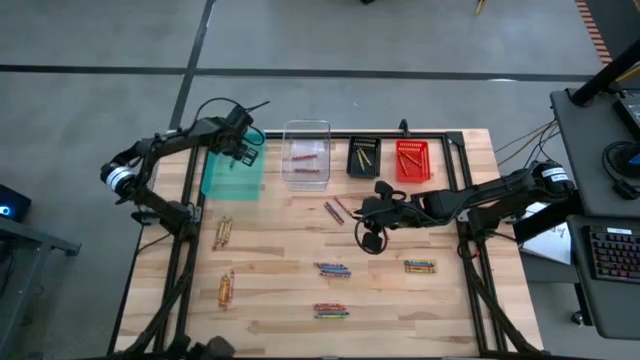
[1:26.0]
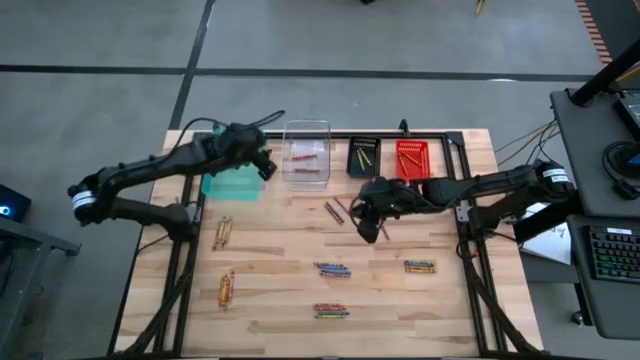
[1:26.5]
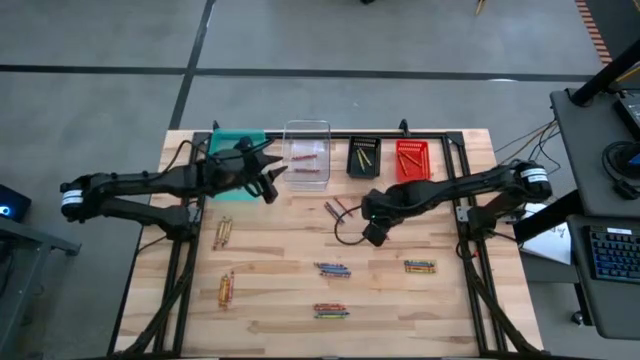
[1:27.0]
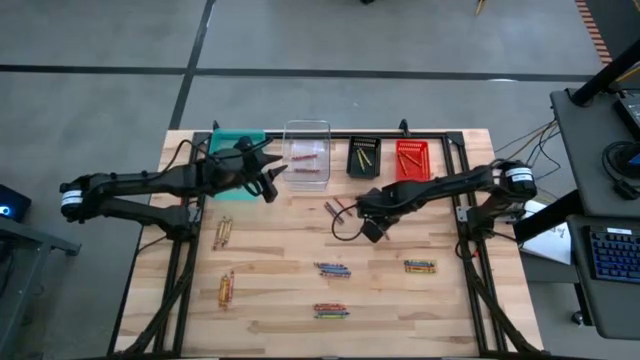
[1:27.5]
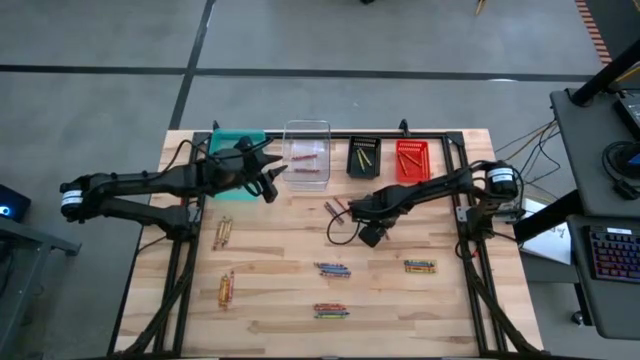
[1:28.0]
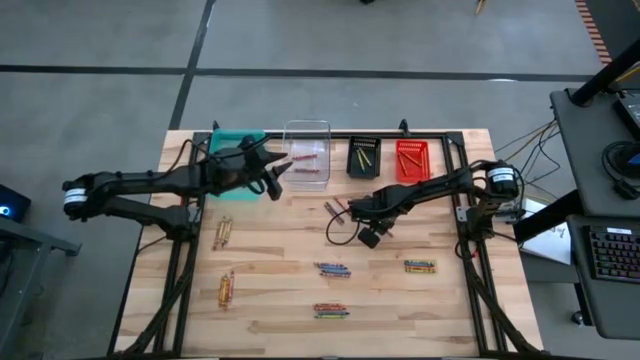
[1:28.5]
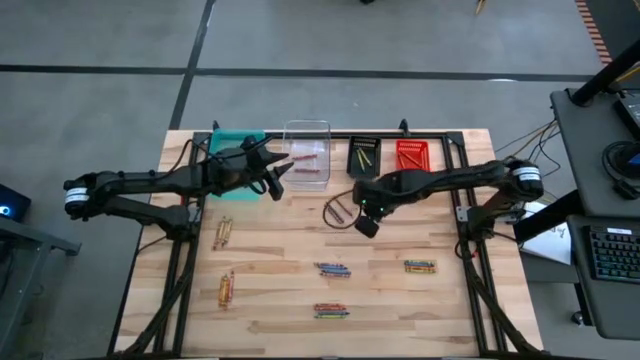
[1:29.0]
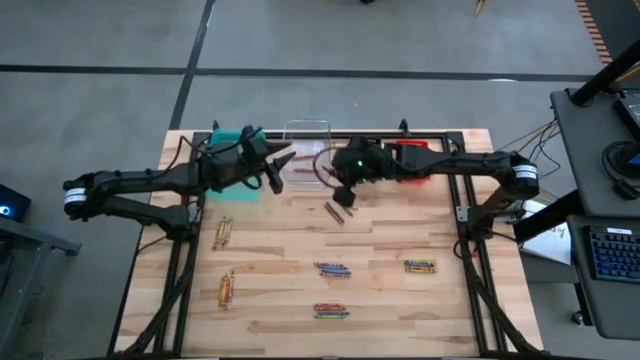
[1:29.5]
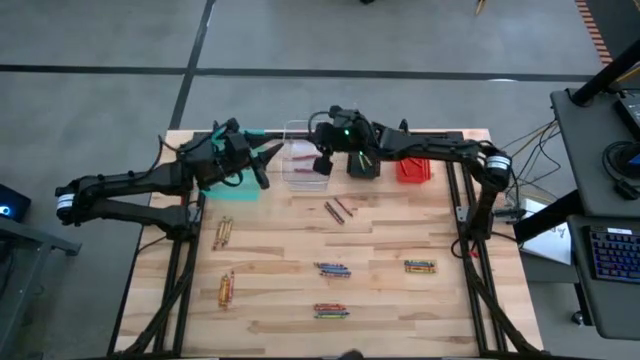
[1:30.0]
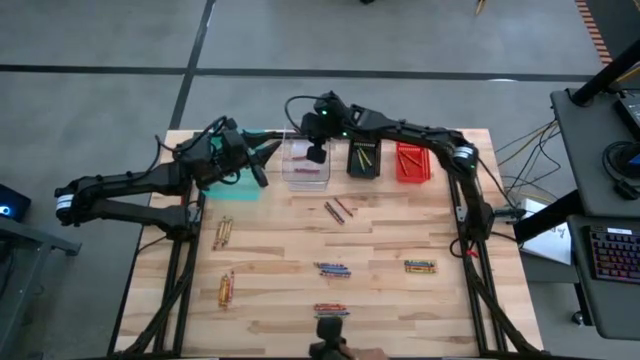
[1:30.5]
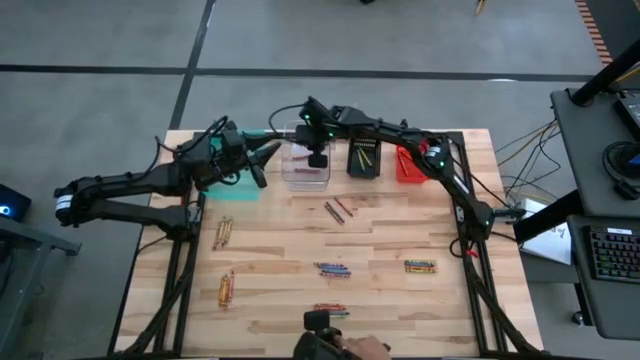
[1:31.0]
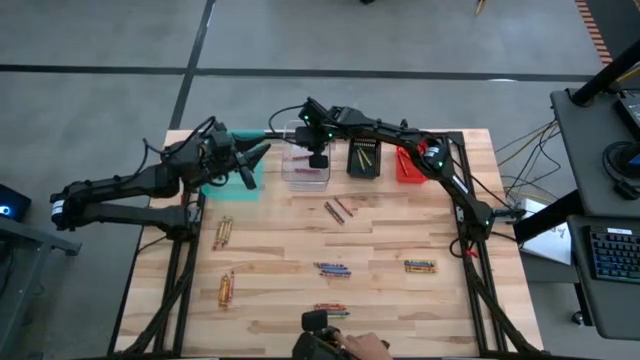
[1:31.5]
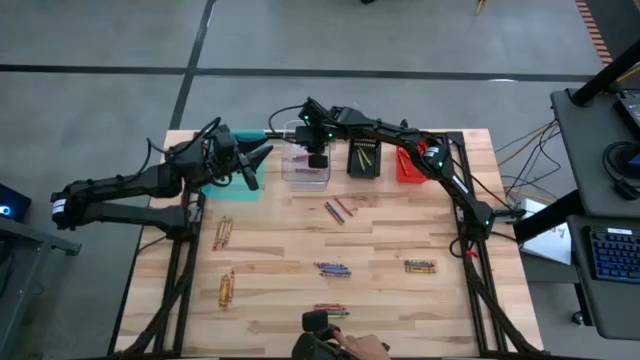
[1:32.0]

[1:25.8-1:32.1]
Task: Sort crayons
Put the red crayon into the transparent bin

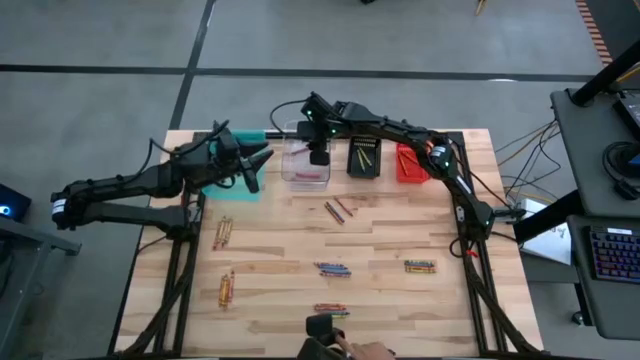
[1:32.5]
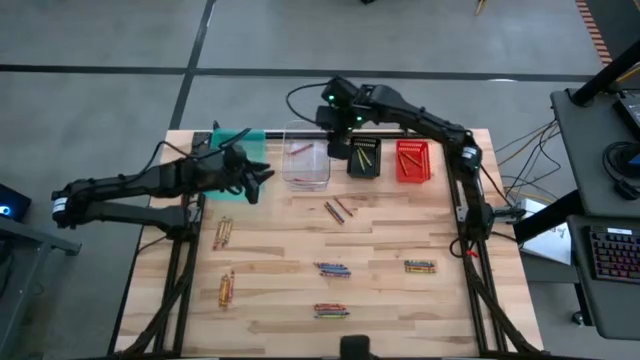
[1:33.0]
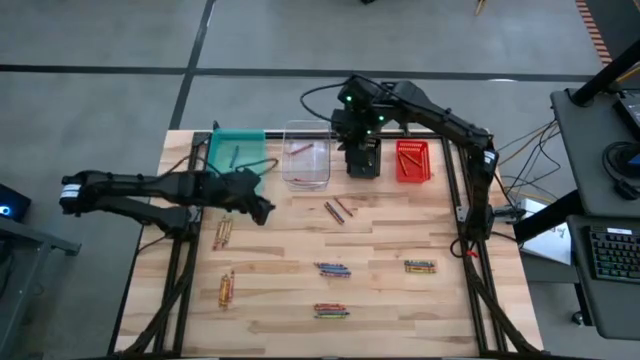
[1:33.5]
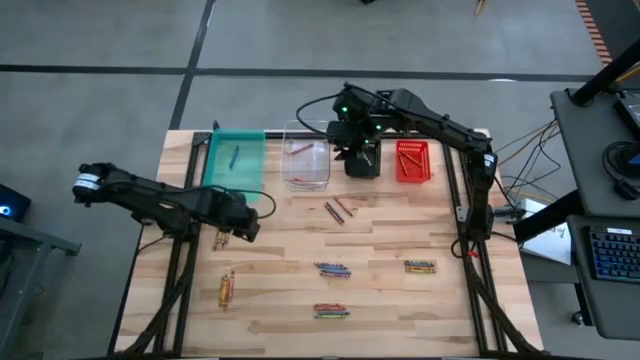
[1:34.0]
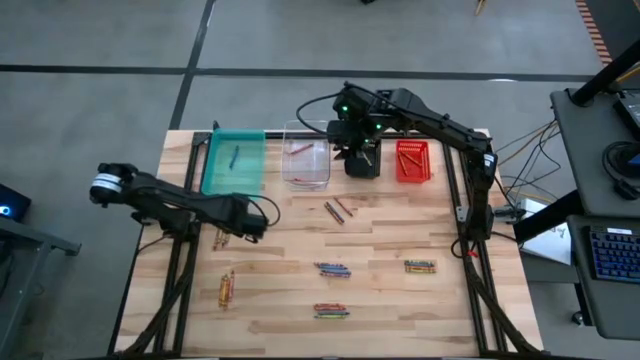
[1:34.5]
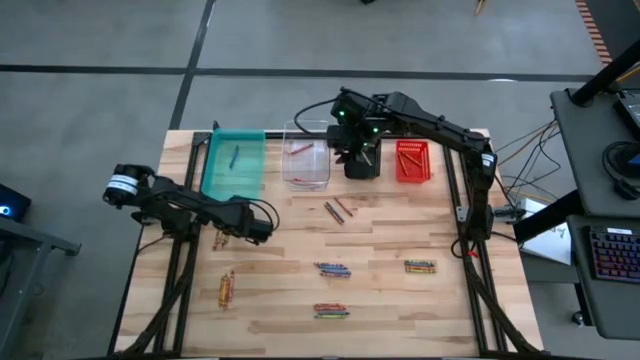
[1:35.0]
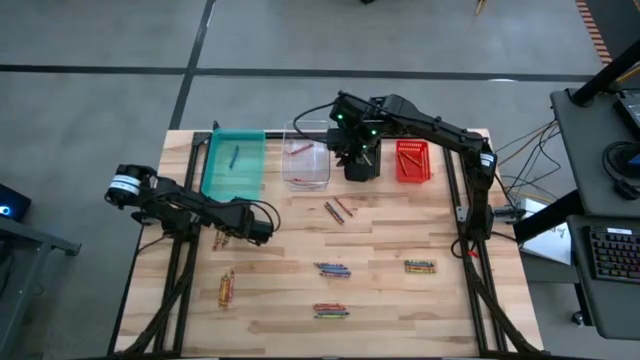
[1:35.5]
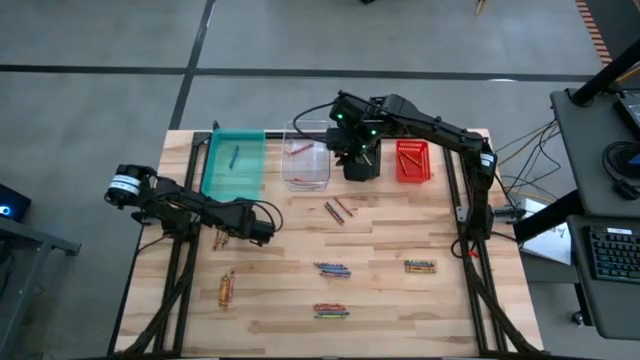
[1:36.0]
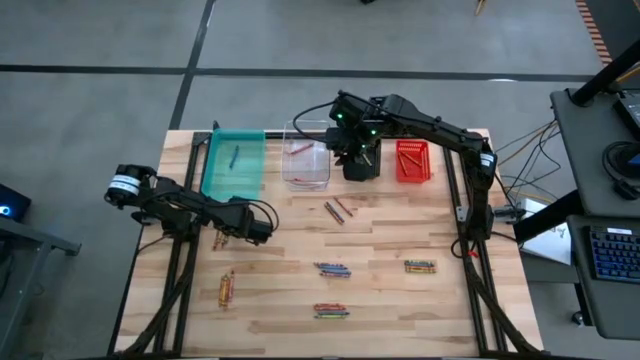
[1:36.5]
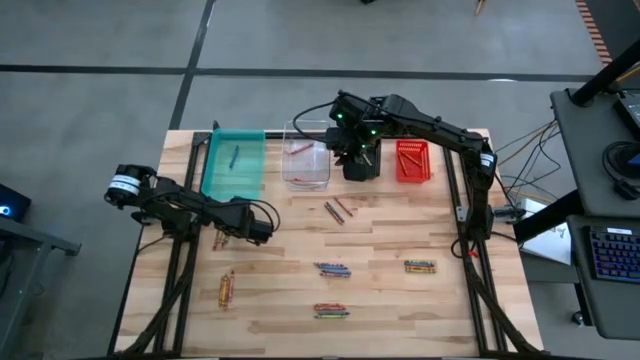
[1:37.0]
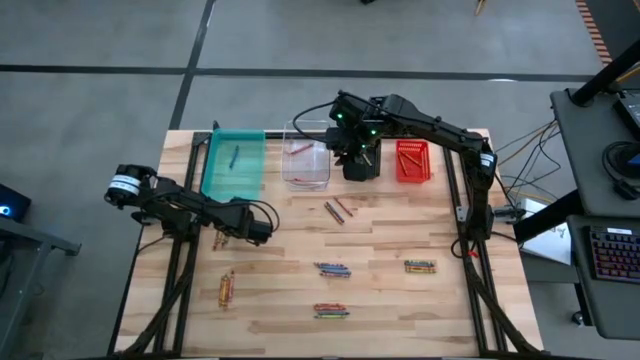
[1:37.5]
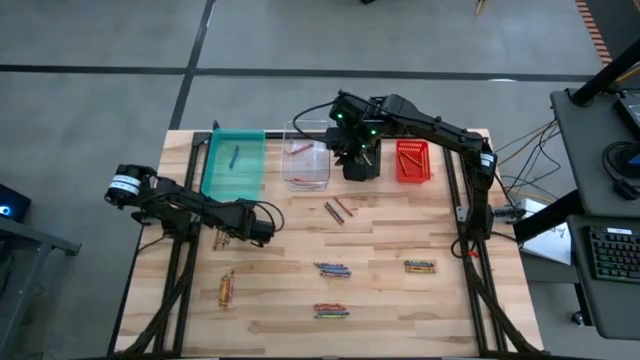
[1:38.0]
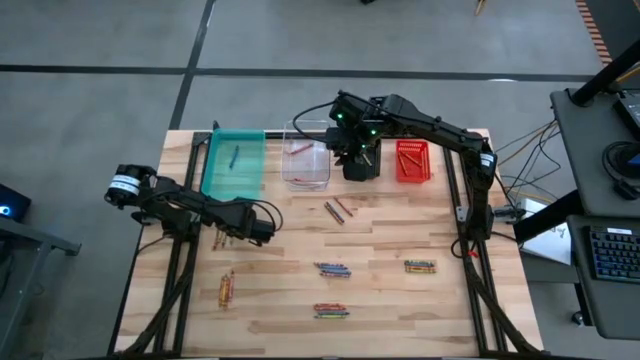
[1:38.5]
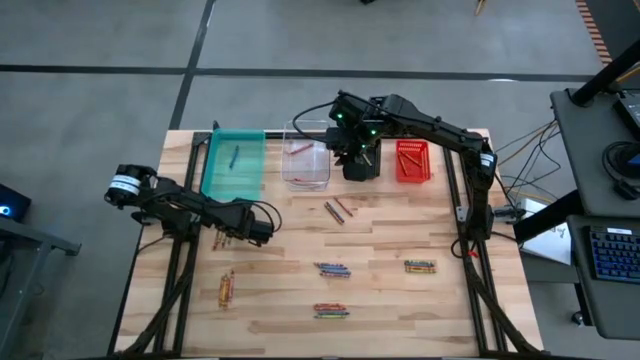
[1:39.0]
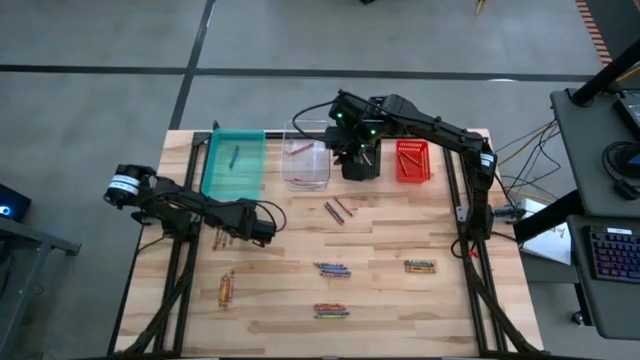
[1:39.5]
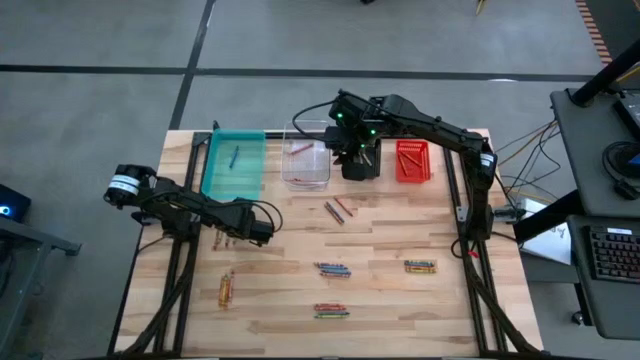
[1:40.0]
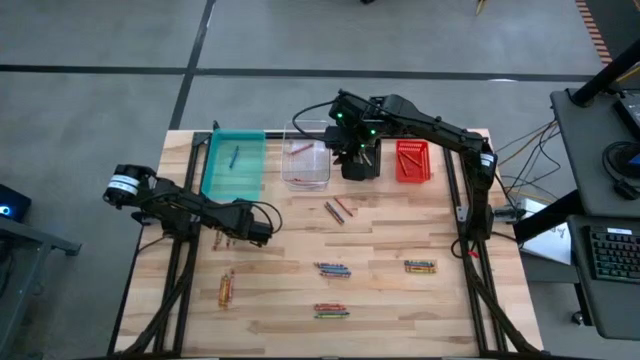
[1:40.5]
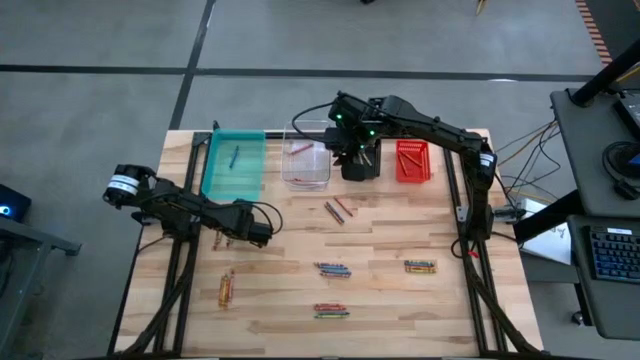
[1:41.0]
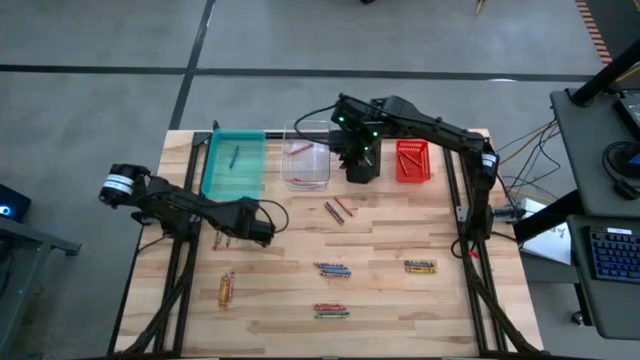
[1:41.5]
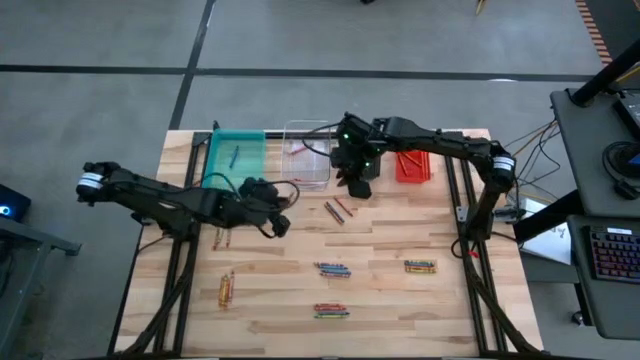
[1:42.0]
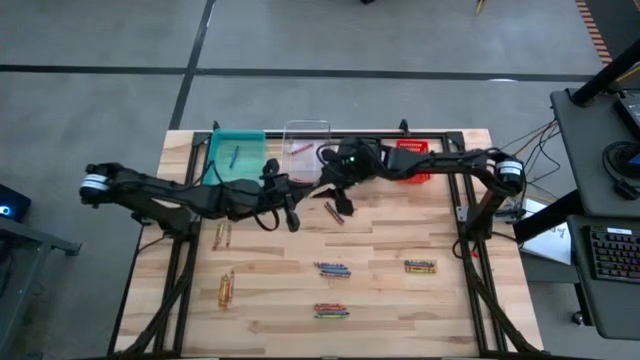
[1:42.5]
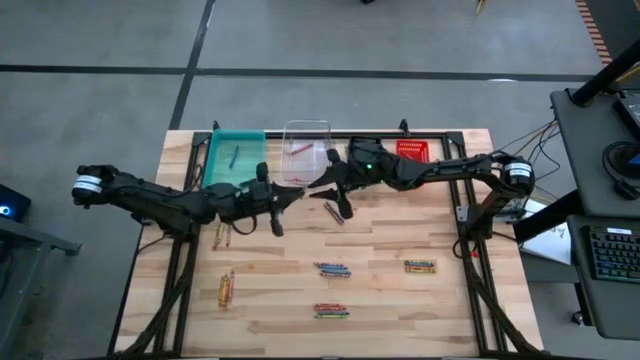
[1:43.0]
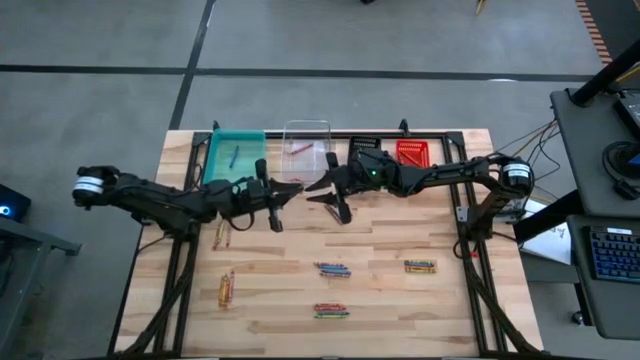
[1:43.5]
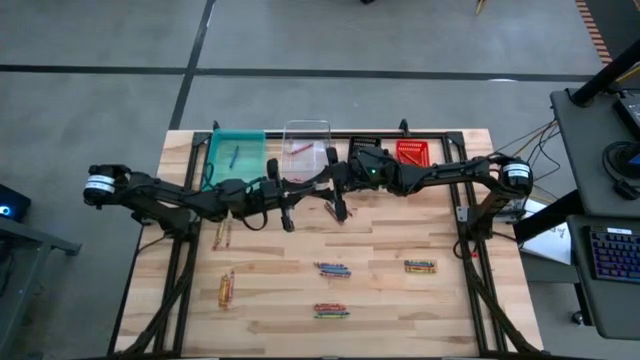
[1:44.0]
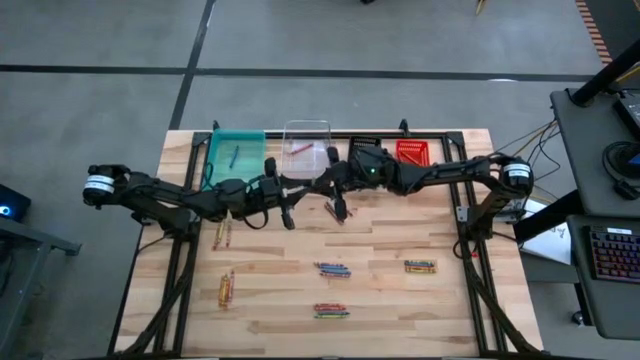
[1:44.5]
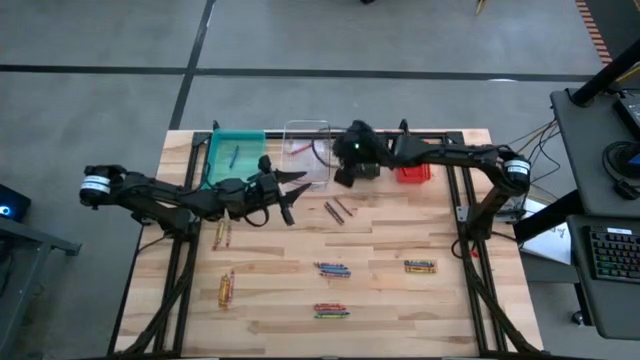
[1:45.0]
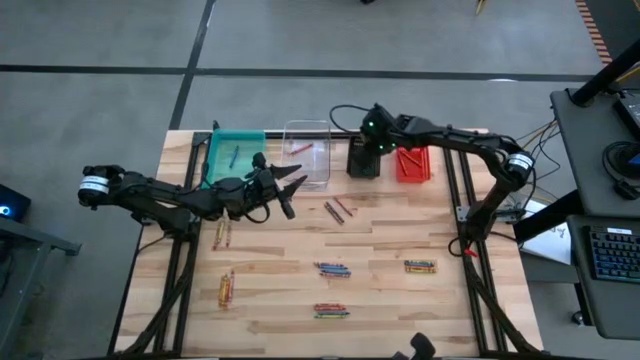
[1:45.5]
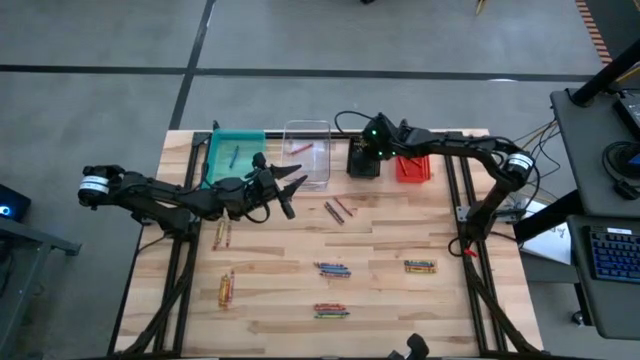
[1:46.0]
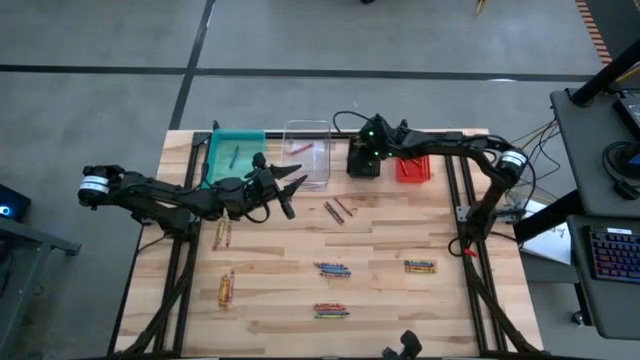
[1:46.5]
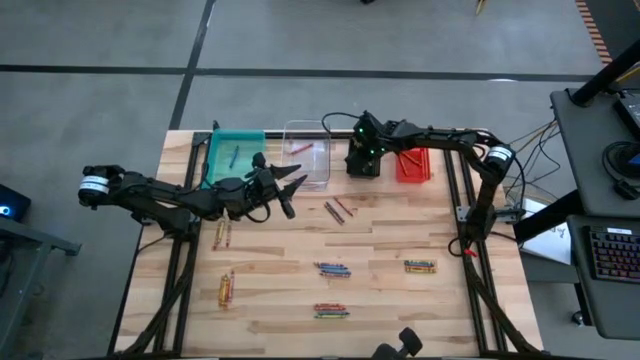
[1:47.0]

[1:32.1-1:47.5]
Put the green crayon into the black bin

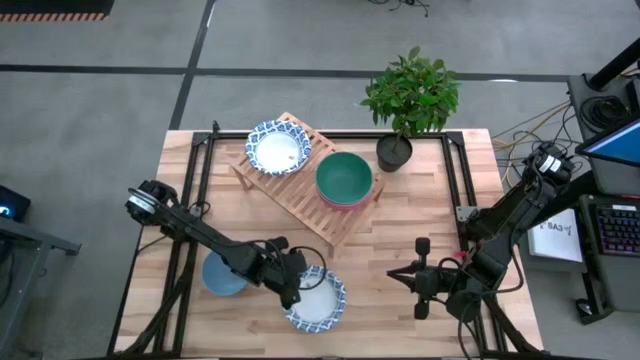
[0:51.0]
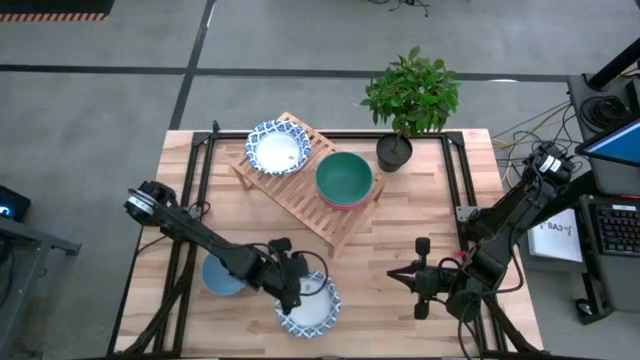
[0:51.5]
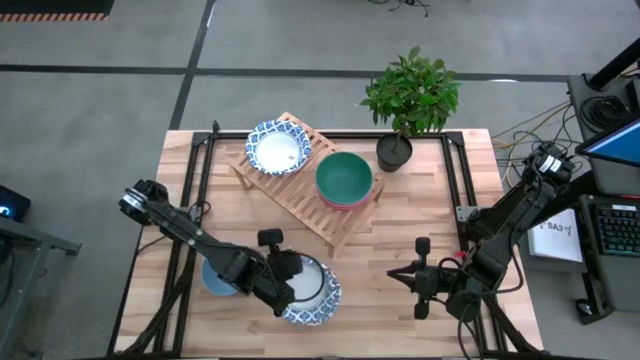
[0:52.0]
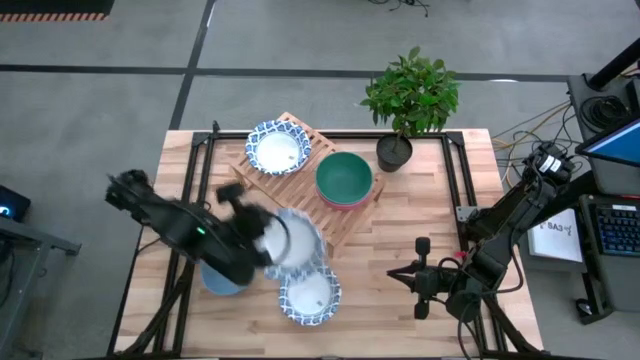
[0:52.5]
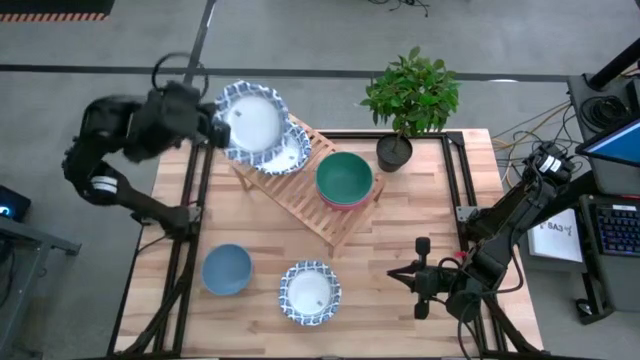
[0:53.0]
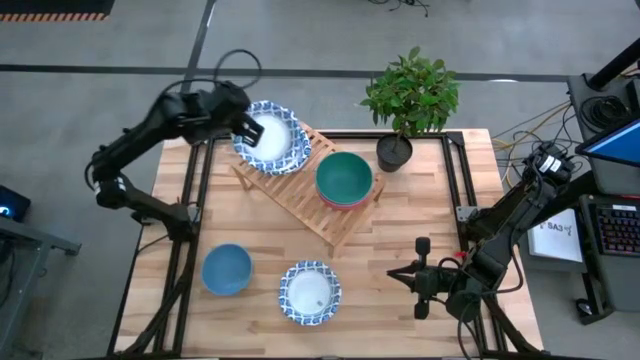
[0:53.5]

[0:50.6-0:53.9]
Task: Place and stack bowls onto a shelf
Stack the white bowl on top of the white bowl on the shelf
